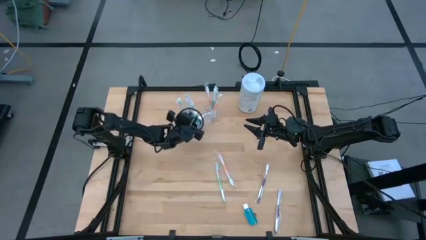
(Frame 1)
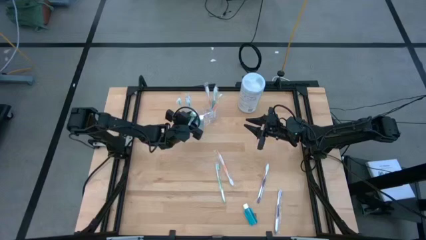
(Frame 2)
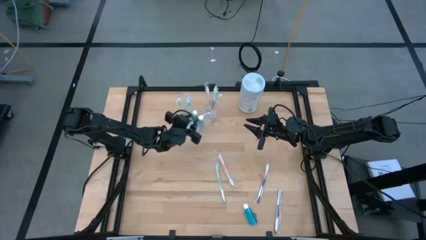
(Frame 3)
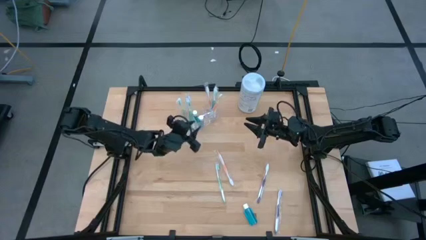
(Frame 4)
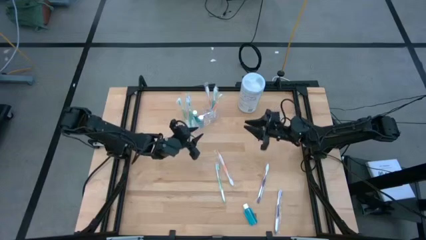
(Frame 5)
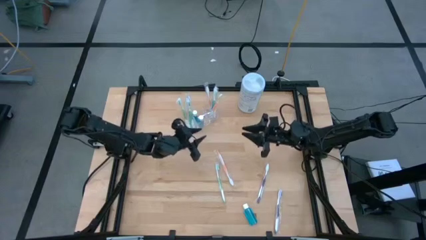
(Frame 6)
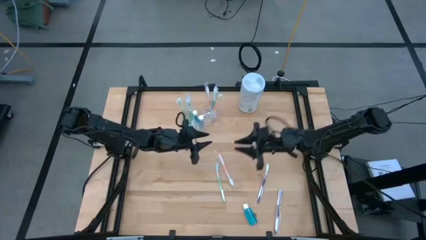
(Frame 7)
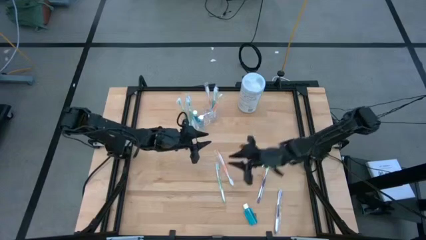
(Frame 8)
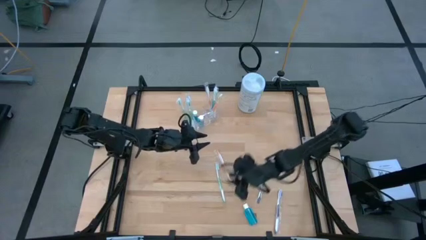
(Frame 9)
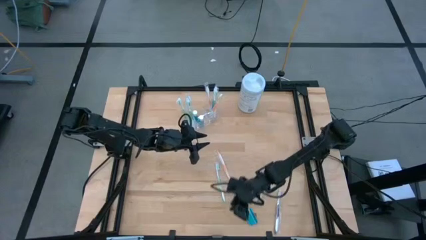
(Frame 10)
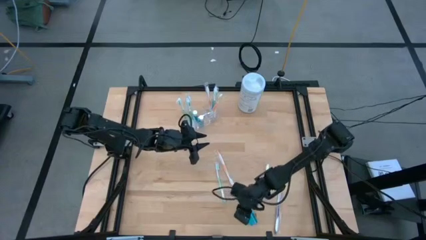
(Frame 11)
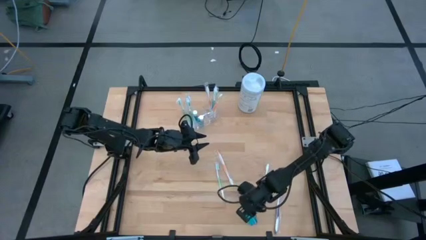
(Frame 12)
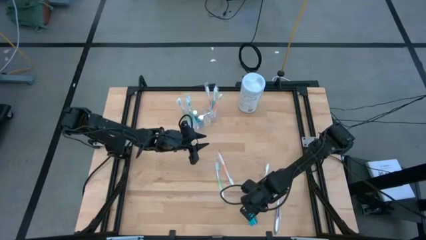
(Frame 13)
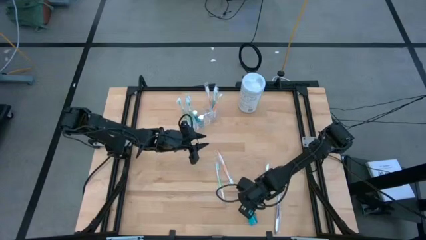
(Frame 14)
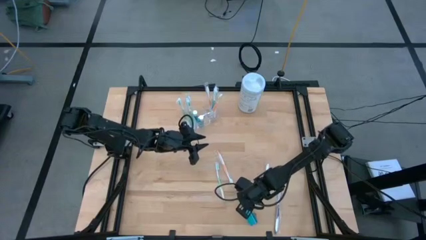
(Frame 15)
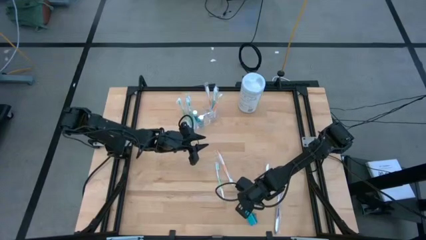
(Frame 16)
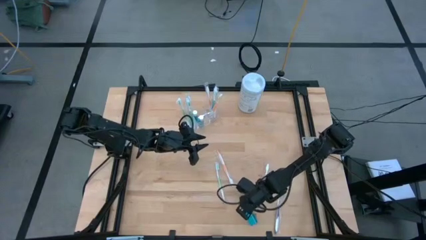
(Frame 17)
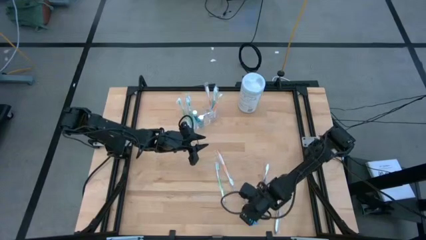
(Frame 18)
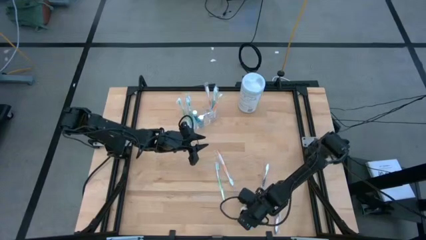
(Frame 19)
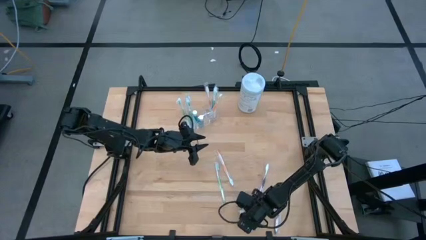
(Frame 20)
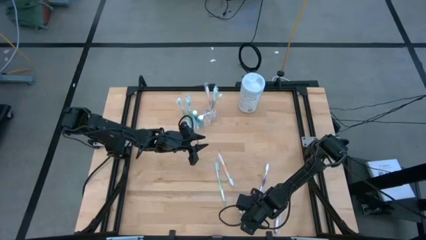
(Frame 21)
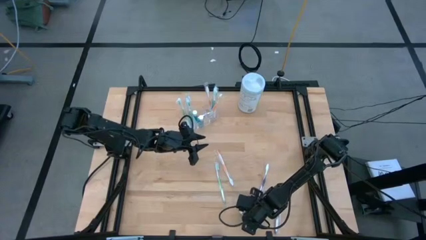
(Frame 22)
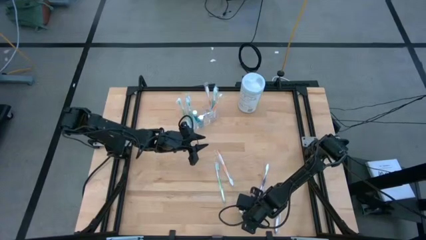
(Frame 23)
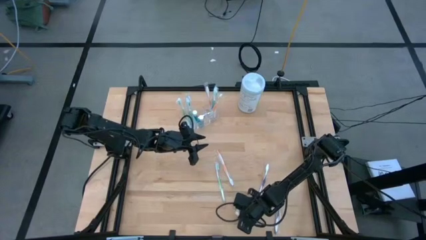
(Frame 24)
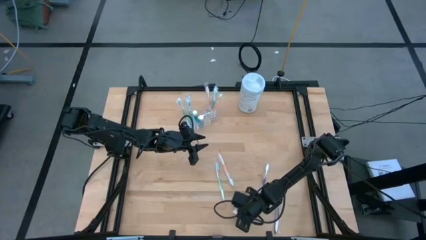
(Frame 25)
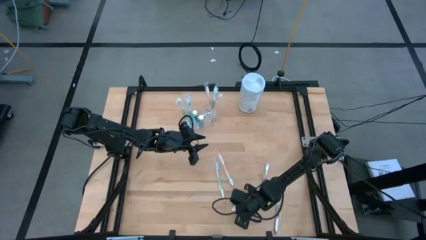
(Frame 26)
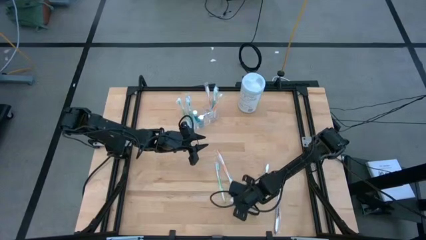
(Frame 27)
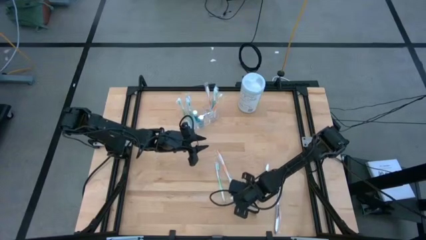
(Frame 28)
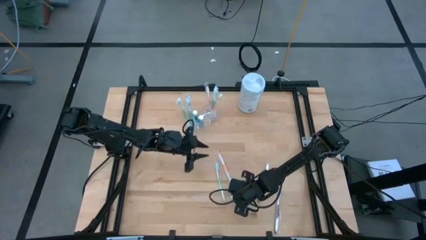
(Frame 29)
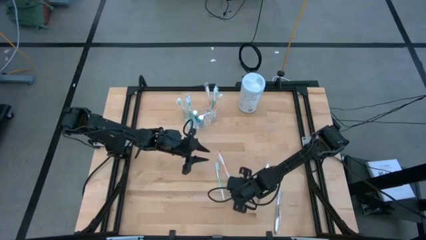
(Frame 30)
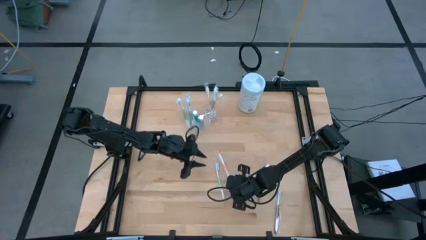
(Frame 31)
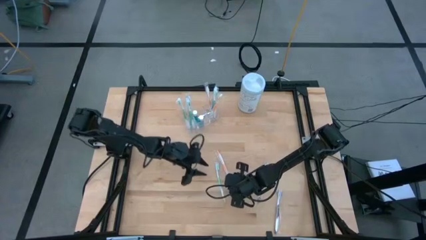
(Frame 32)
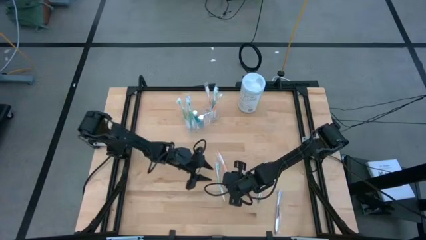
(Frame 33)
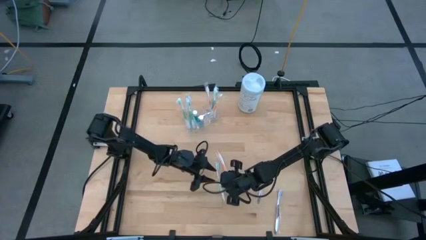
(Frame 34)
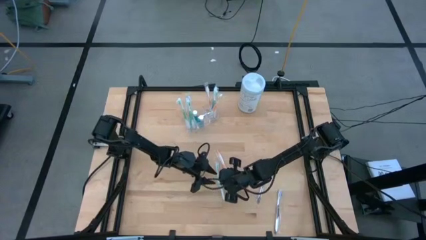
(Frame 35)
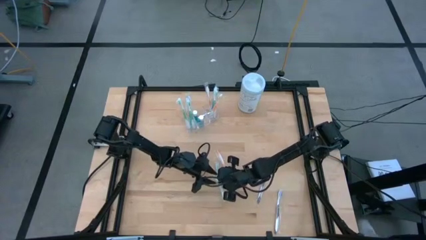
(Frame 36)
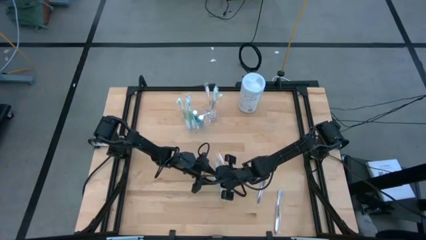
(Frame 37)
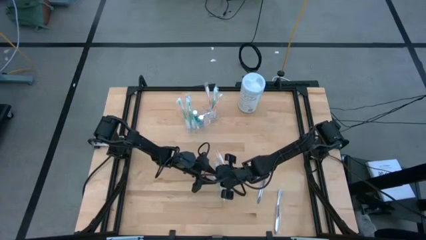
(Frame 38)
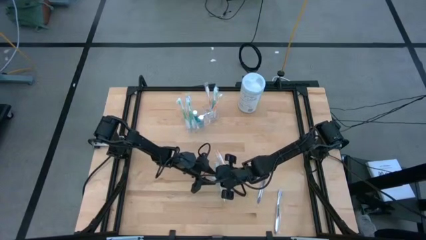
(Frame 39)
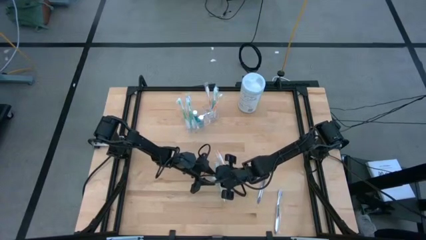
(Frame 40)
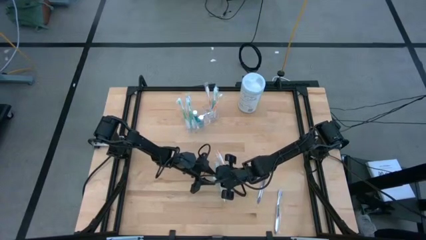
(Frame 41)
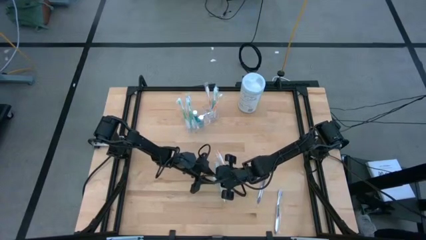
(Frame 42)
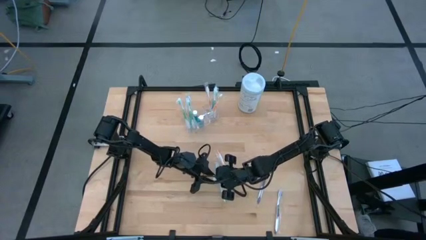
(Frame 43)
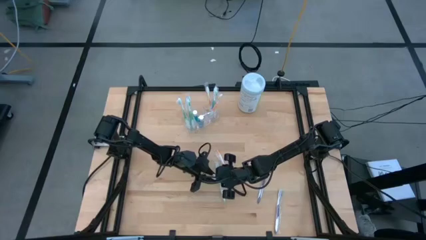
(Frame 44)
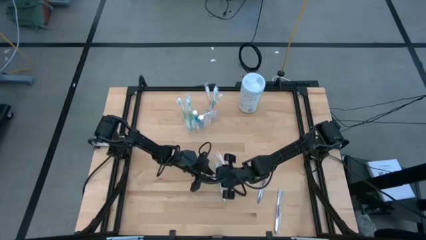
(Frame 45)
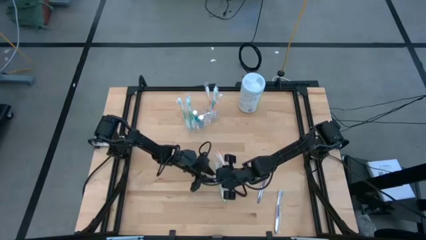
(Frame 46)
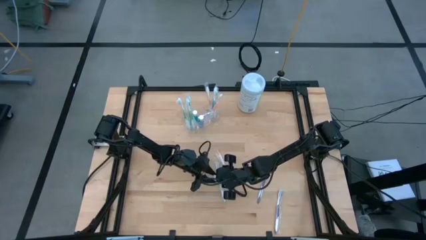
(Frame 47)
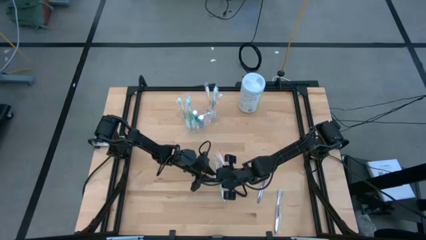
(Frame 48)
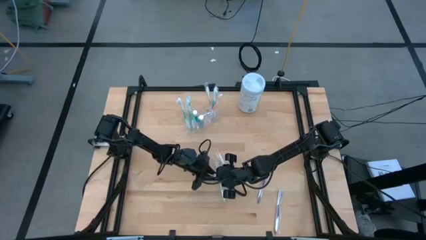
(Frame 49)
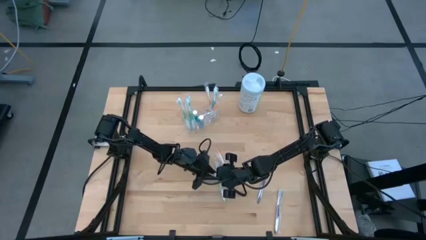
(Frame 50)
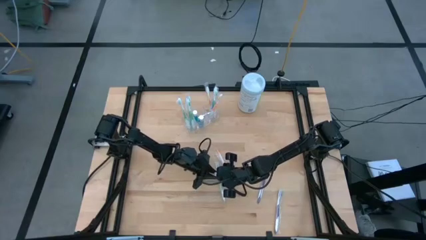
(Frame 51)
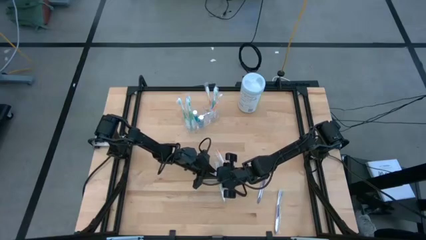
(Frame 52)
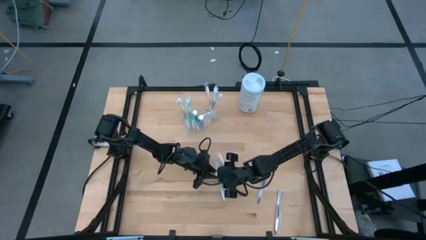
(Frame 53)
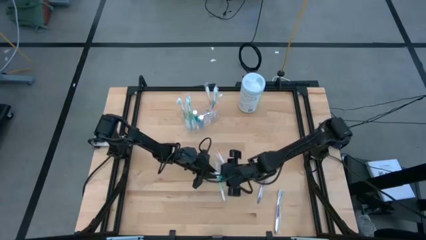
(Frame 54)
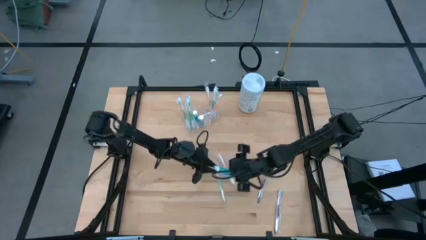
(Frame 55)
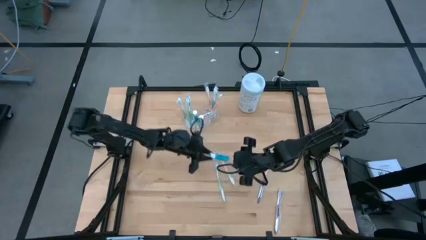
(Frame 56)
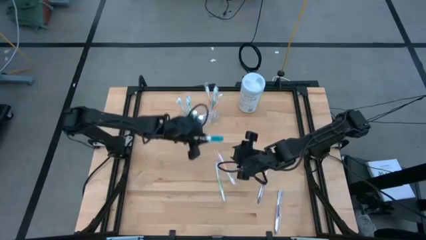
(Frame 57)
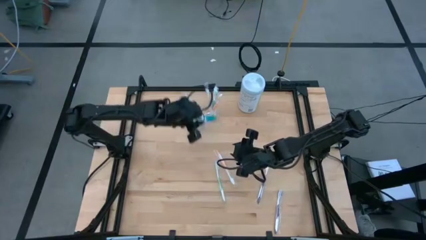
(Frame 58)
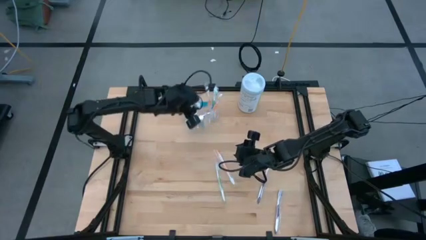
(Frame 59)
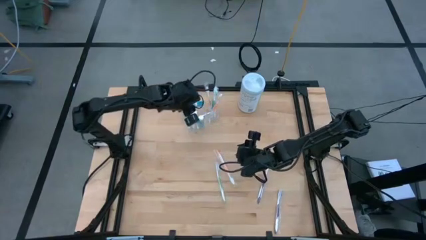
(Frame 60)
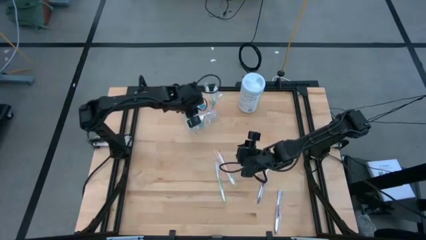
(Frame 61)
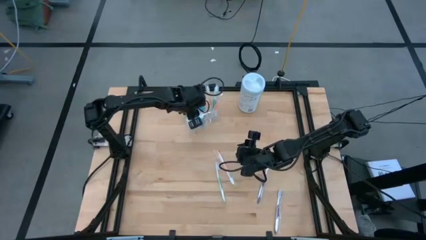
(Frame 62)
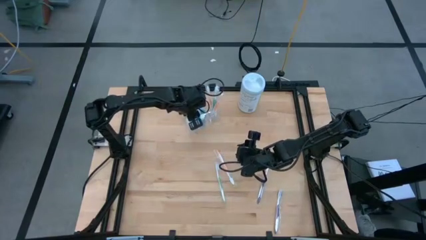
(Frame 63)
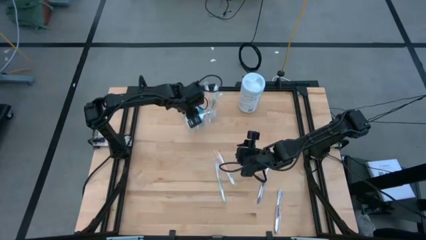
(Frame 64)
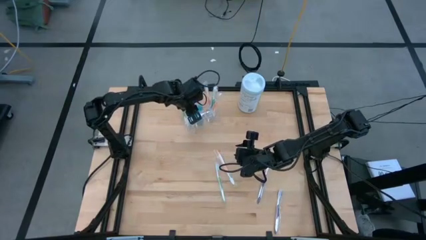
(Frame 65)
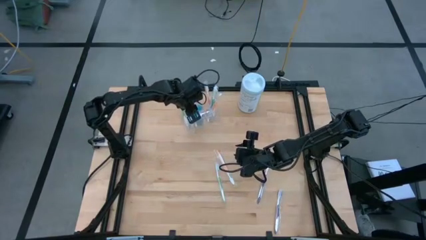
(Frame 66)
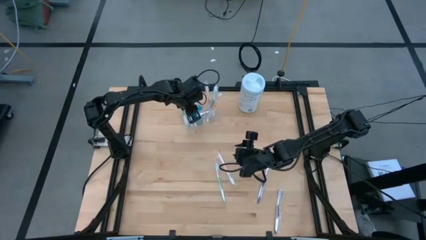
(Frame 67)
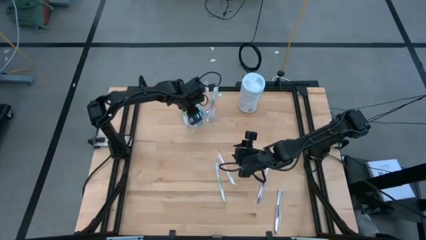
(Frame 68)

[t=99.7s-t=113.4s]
Task: Pick & Place toothbrushing station
Put the blue mouthwash into the transparent organizer
